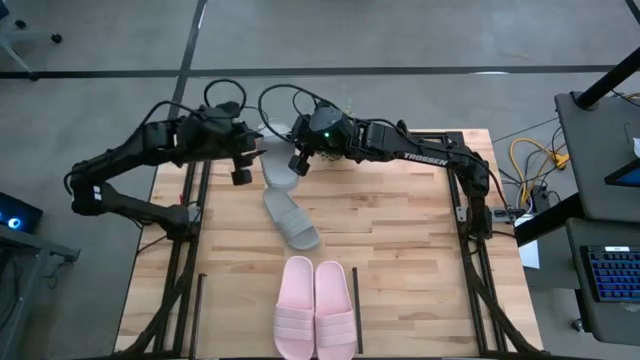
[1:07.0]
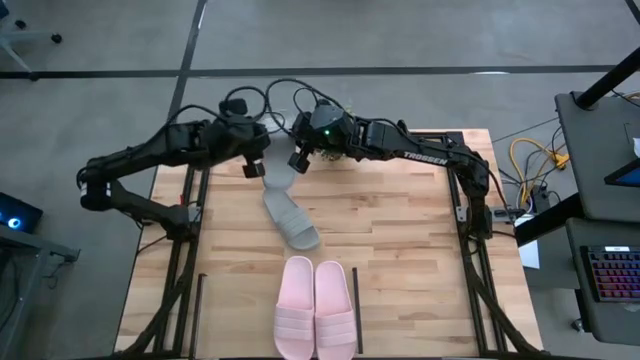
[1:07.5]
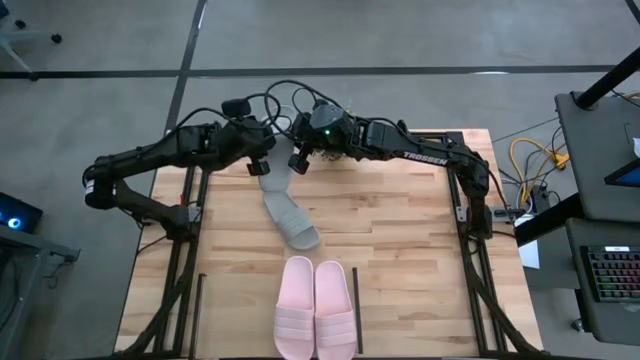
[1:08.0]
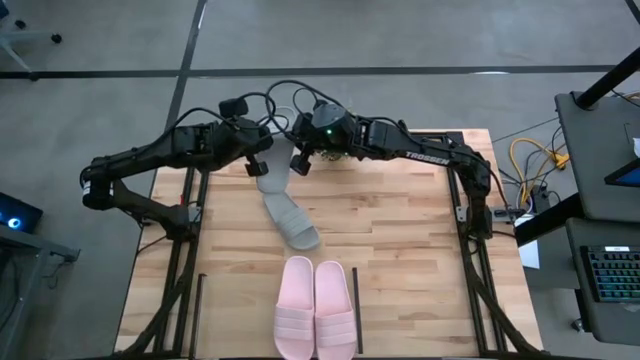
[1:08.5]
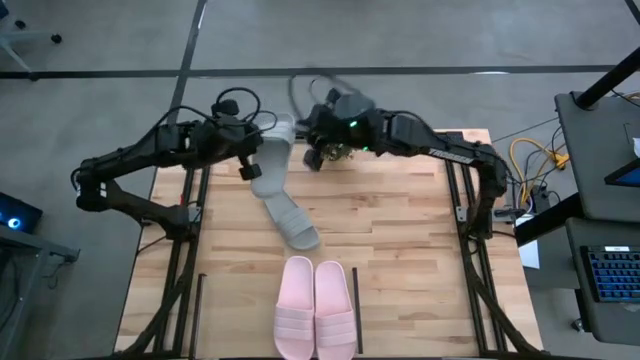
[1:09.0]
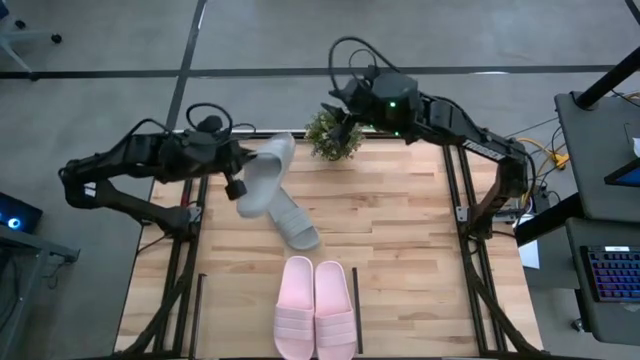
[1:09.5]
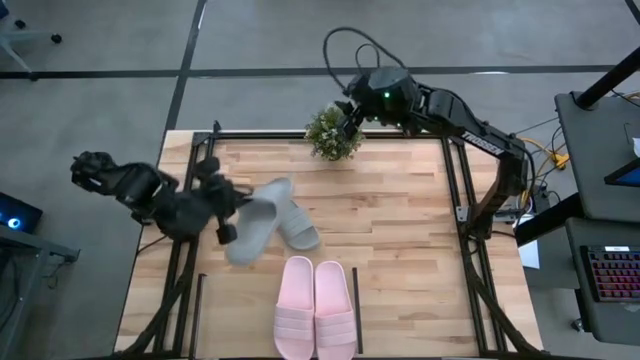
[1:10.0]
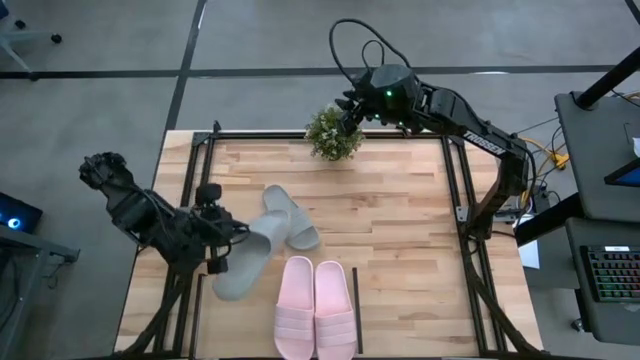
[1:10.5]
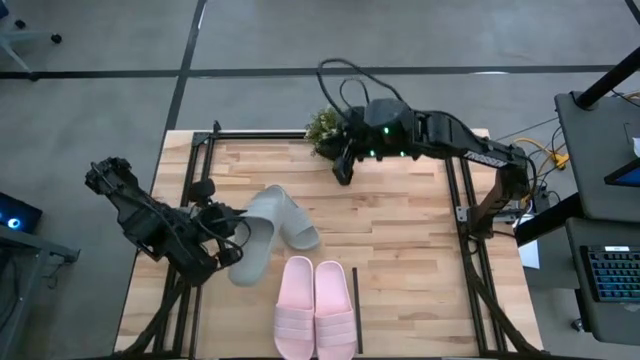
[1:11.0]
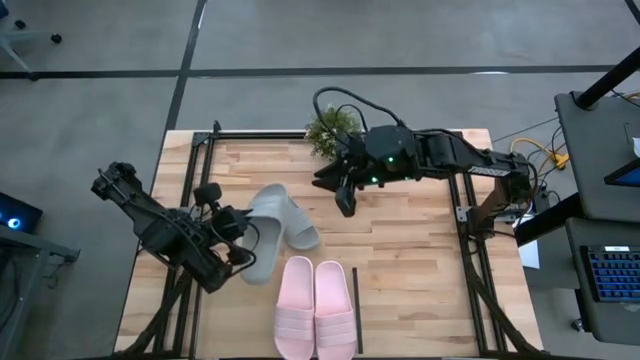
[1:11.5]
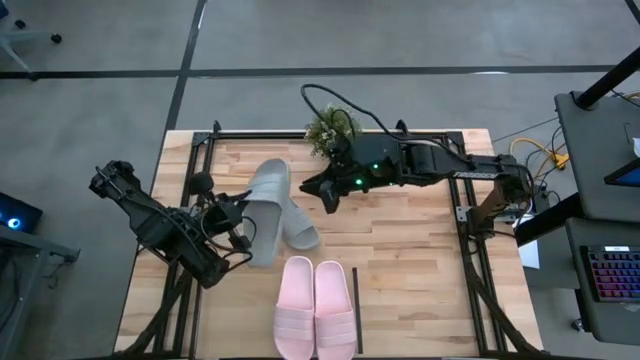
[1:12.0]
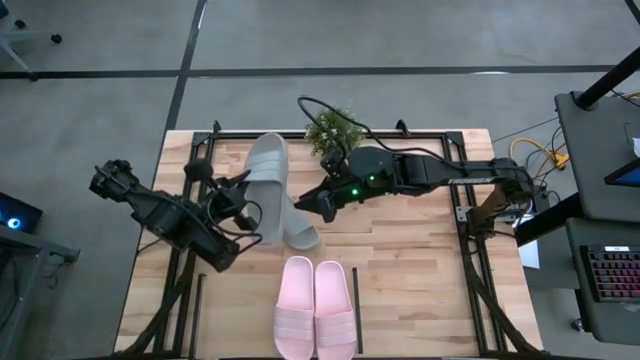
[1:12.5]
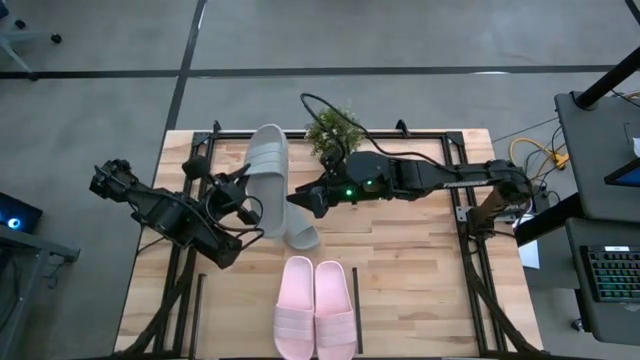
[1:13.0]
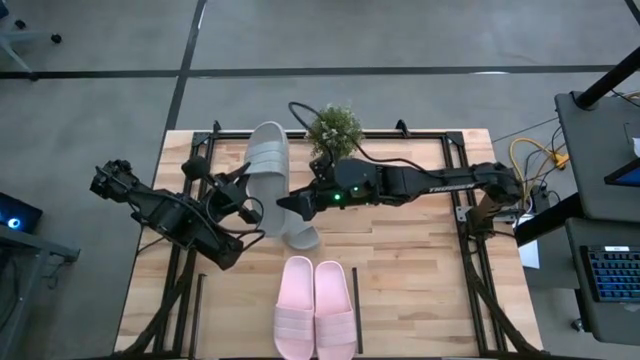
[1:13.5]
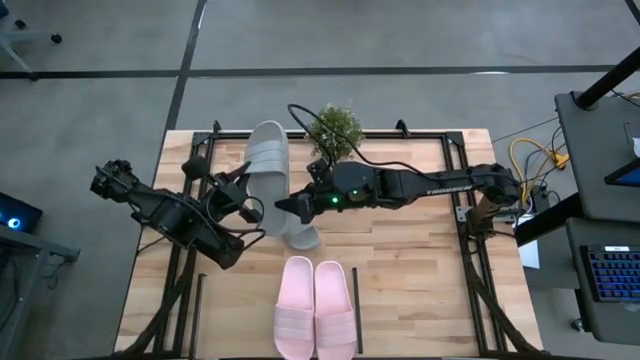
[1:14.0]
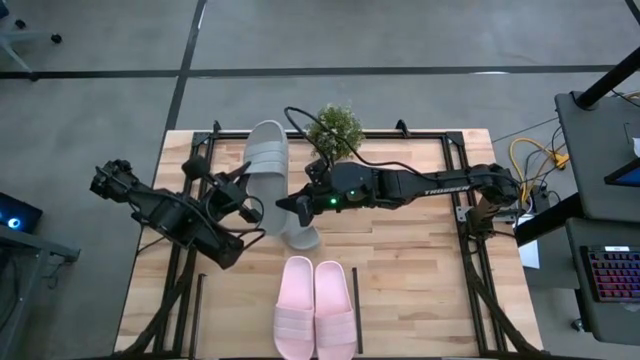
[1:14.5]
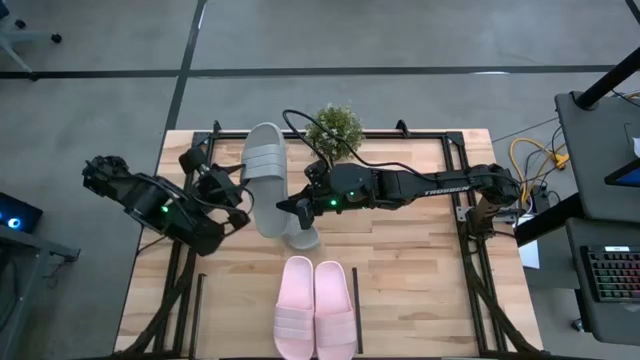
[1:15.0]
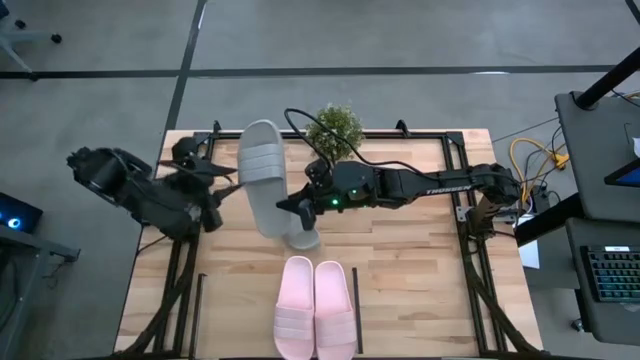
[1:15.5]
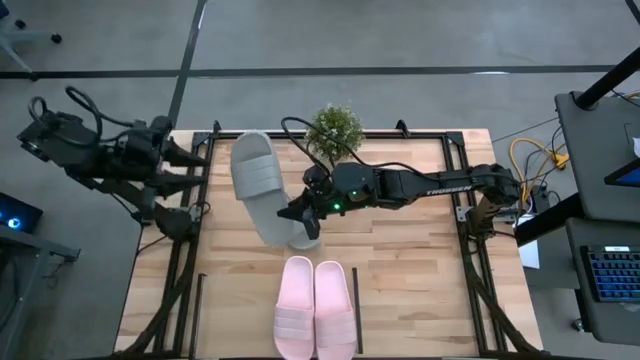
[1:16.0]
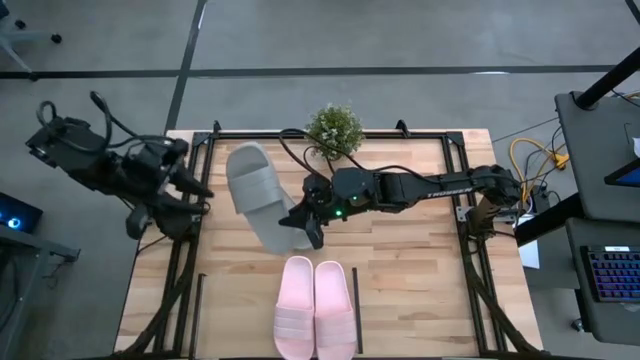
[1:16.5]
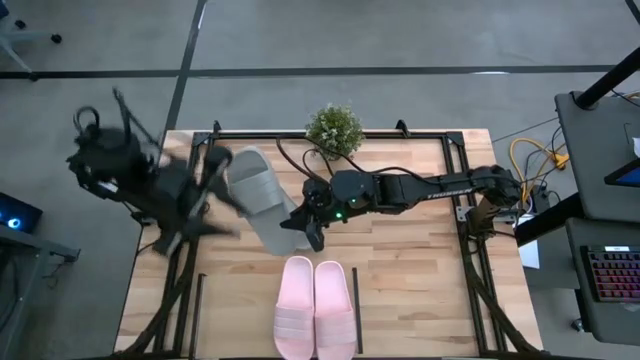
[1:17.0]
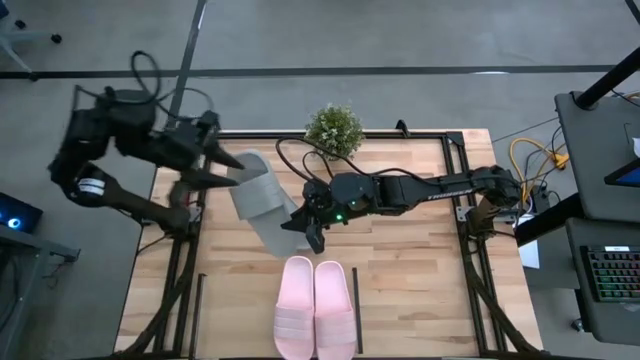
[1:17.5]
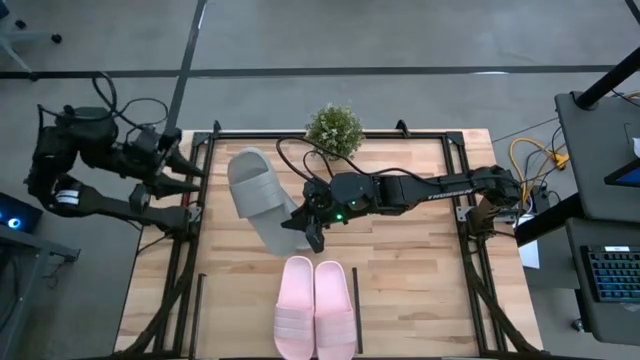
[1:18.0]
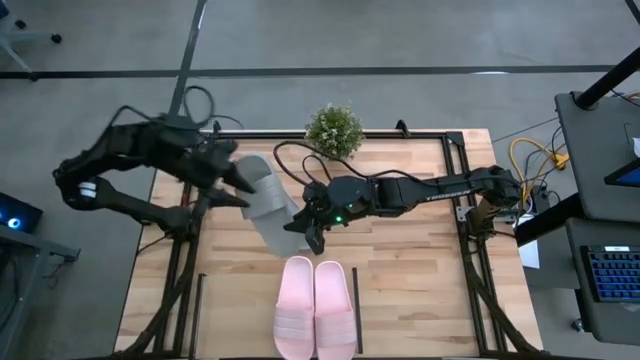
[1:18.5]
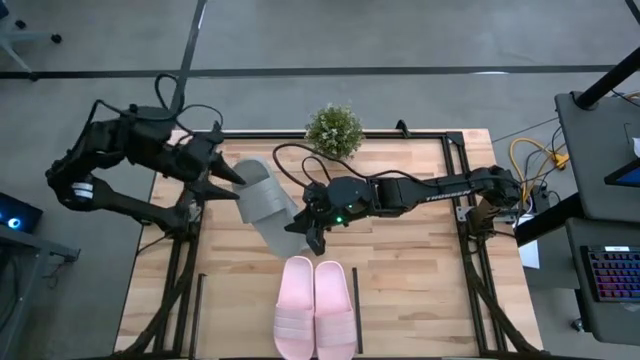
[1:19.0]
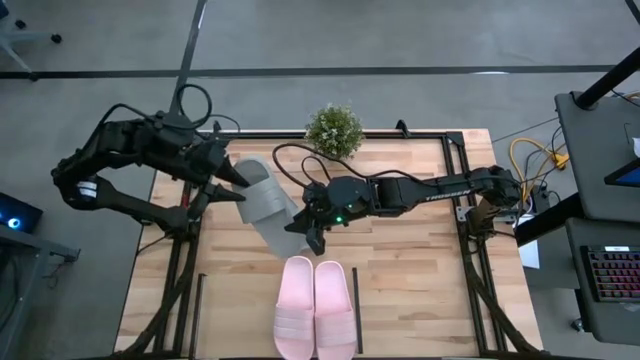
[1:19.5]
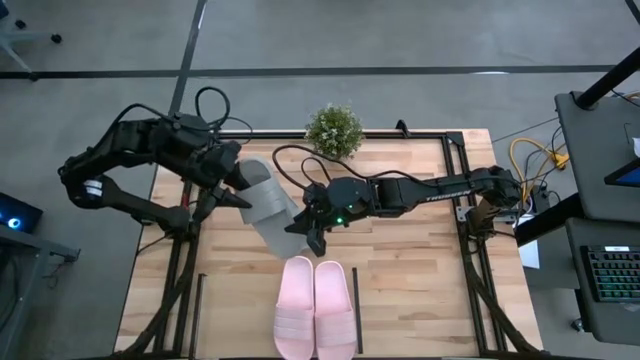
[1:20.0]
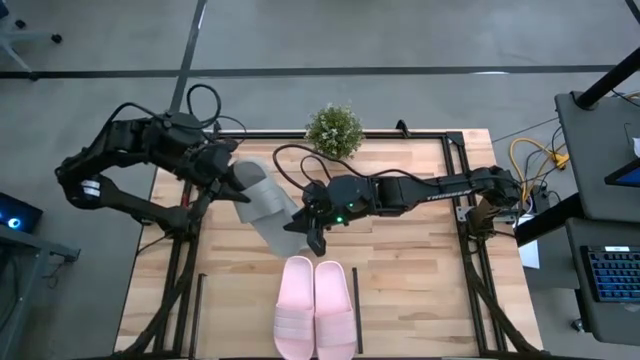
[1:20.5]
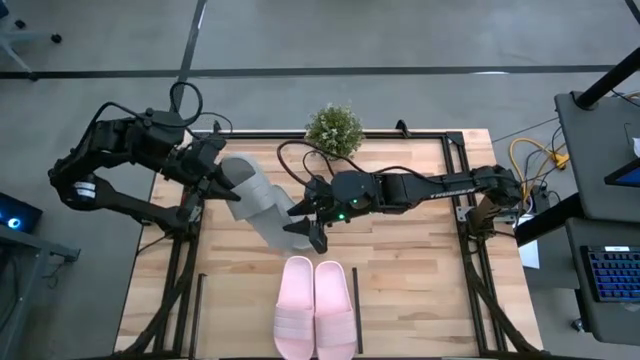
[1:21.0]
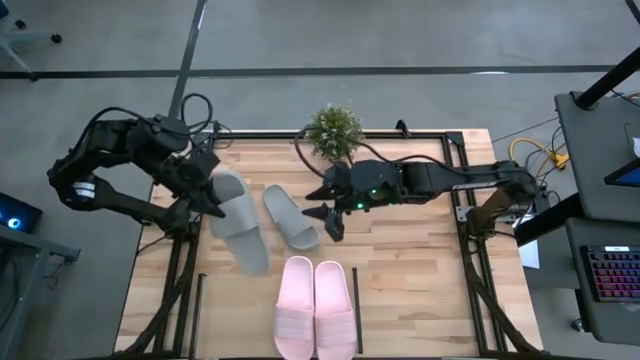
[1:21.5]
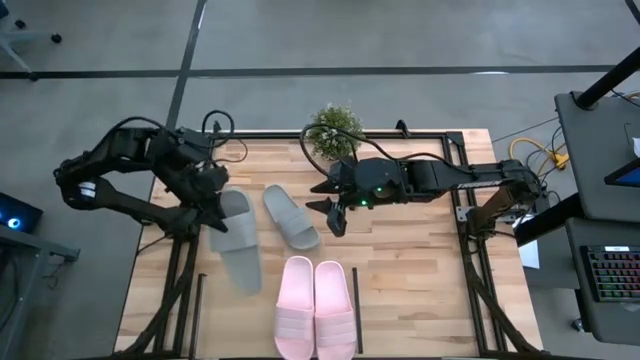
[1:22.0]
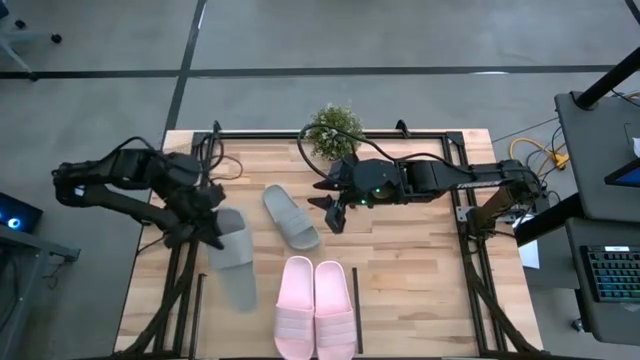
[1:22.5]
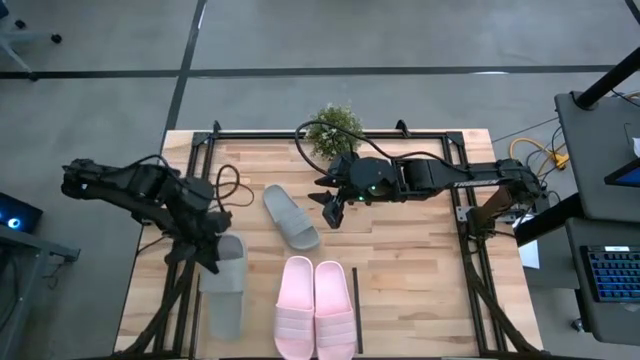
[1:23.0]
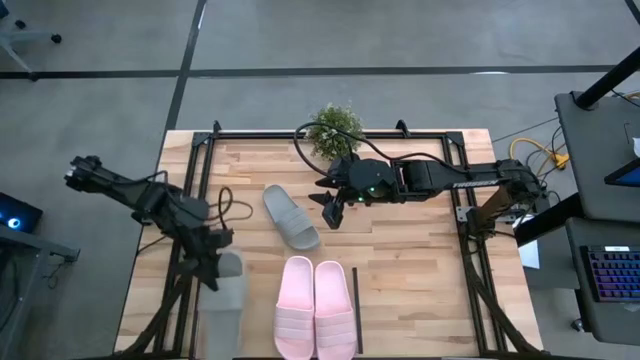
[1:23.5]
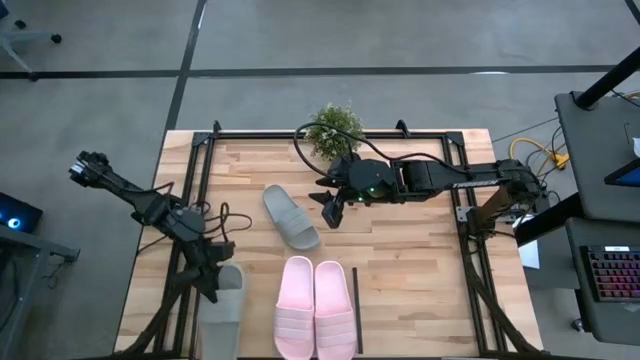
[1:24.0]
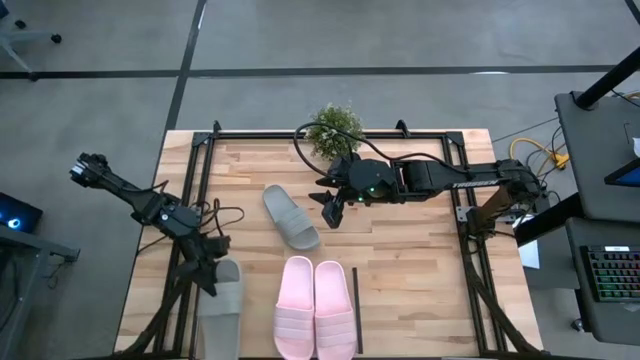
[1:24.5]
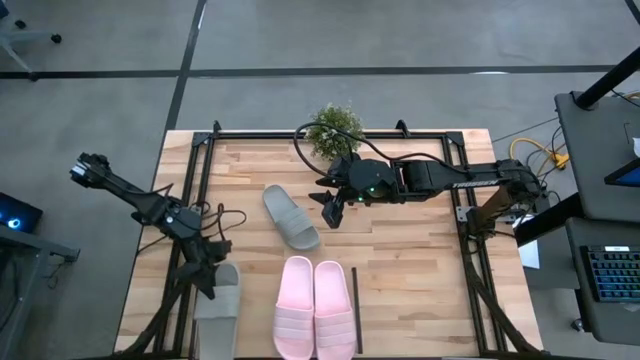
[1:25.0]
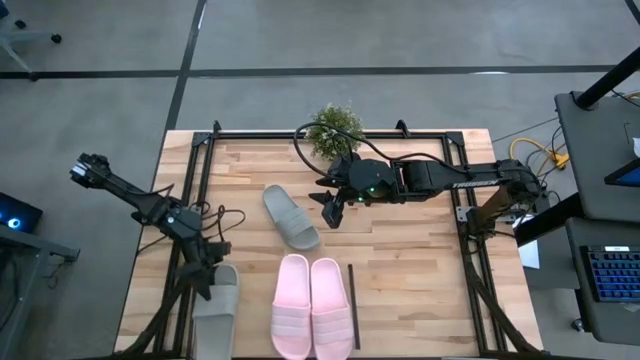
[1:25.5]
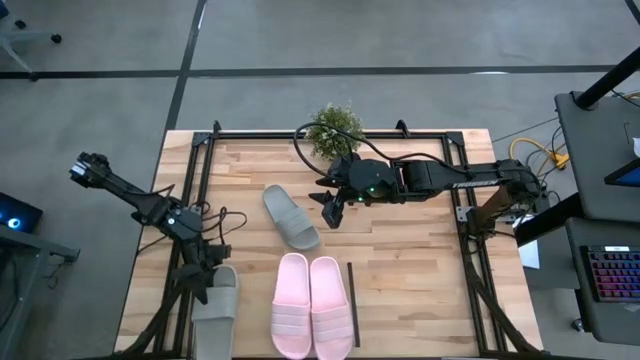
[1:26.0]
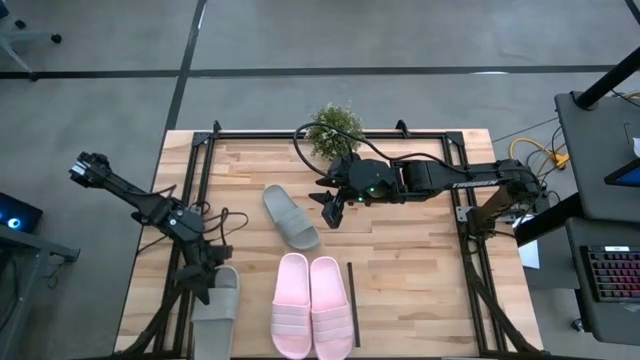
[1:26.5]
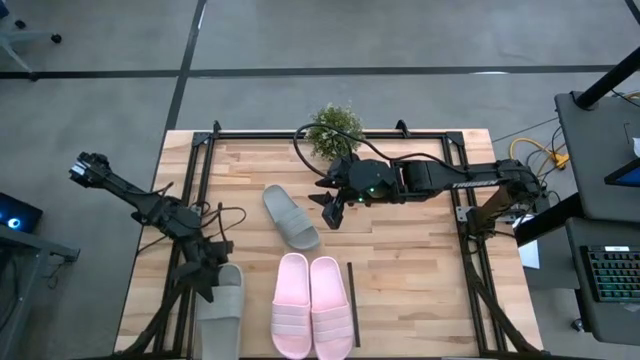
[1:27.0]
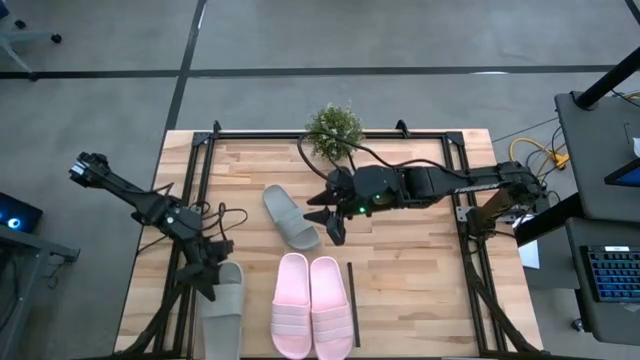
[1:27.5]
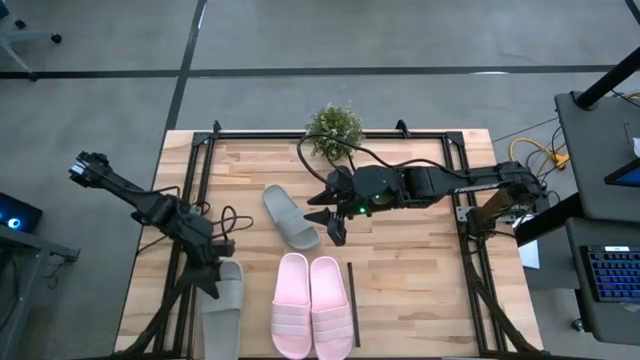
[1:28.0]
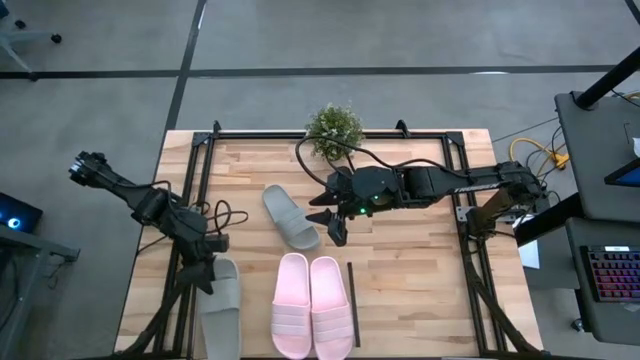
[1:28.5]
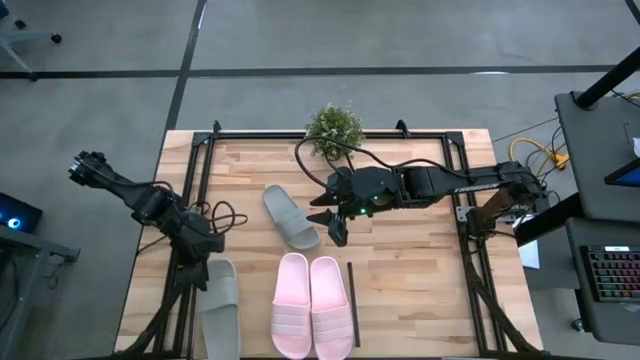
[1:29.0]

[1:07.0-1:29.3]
Task: Pick and place slides into the shelf
Put the top gray slipper on the shelf
